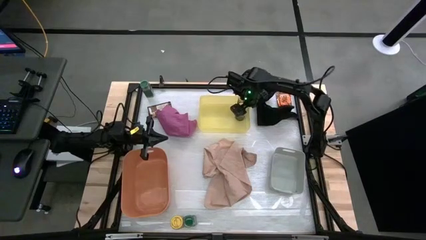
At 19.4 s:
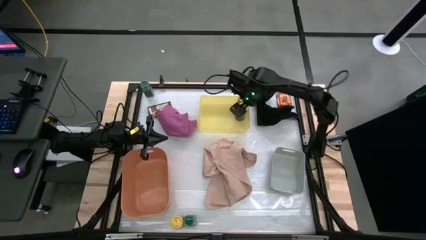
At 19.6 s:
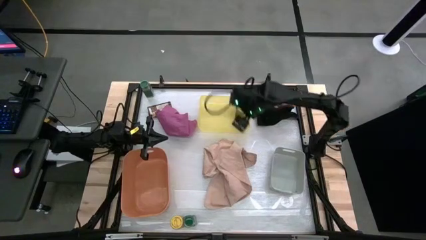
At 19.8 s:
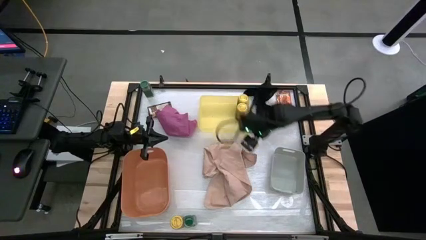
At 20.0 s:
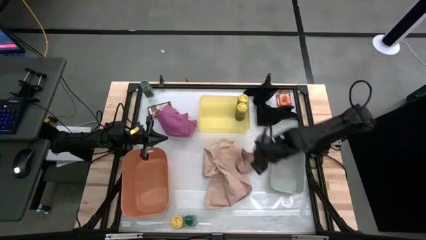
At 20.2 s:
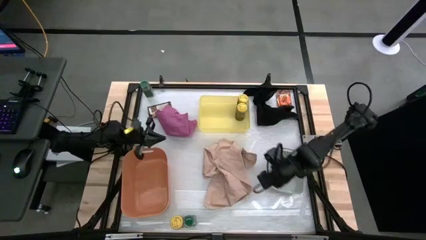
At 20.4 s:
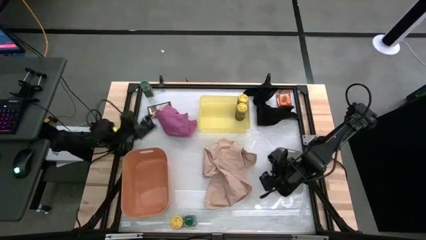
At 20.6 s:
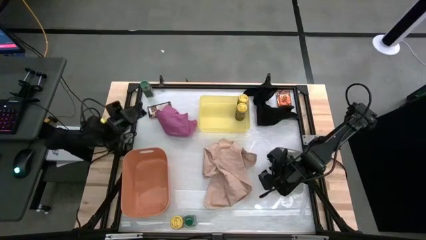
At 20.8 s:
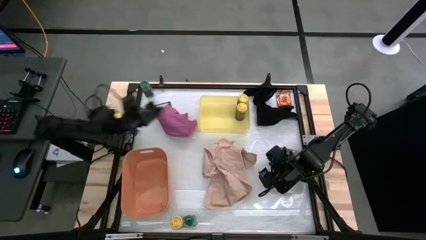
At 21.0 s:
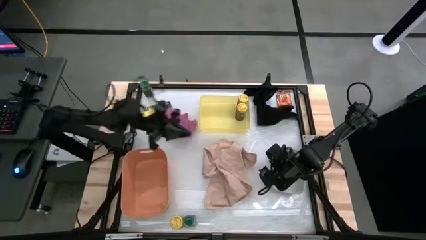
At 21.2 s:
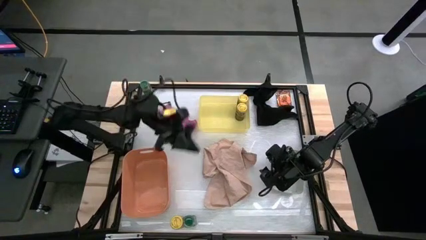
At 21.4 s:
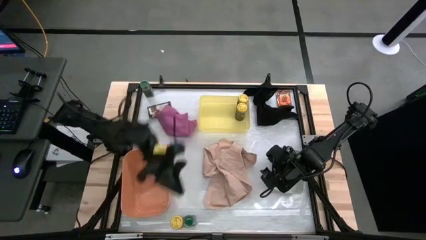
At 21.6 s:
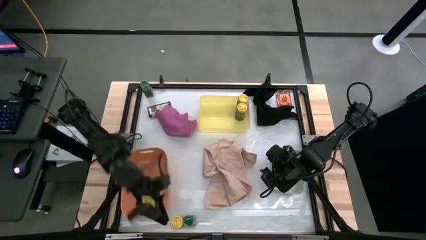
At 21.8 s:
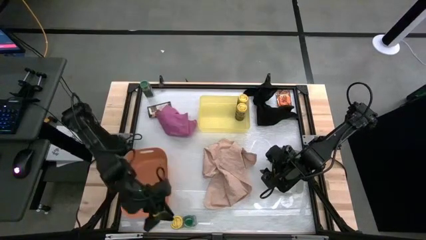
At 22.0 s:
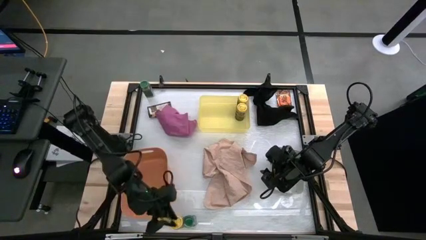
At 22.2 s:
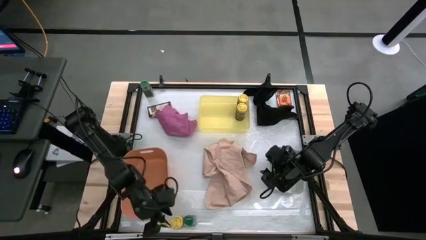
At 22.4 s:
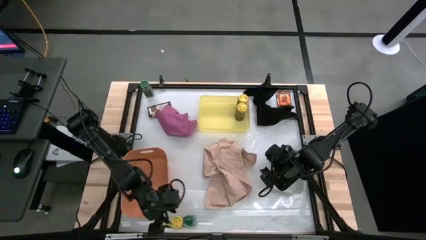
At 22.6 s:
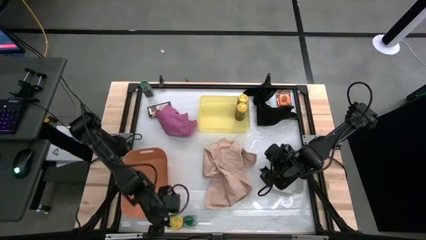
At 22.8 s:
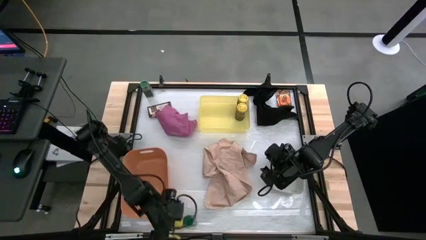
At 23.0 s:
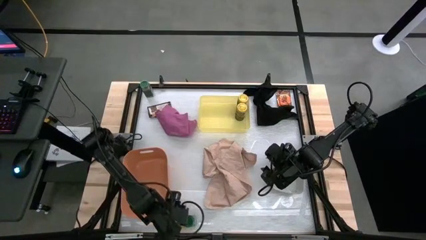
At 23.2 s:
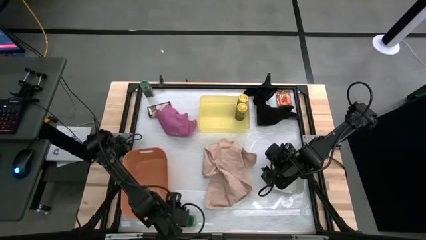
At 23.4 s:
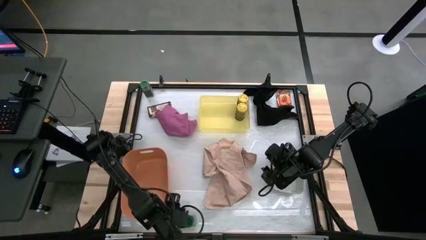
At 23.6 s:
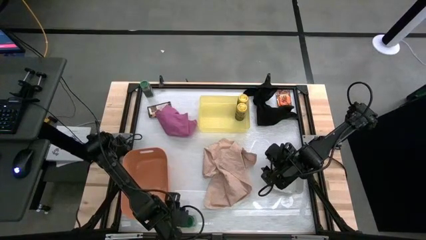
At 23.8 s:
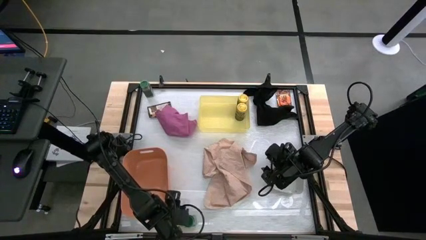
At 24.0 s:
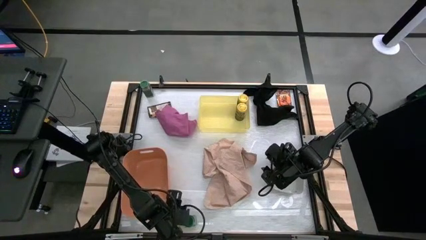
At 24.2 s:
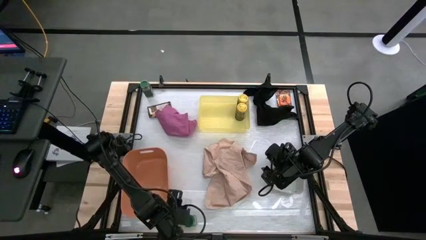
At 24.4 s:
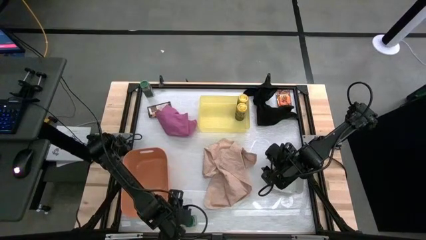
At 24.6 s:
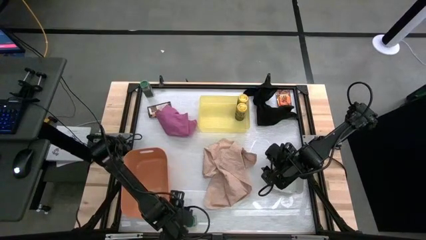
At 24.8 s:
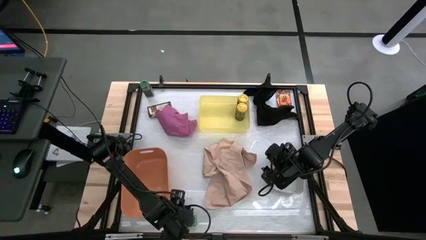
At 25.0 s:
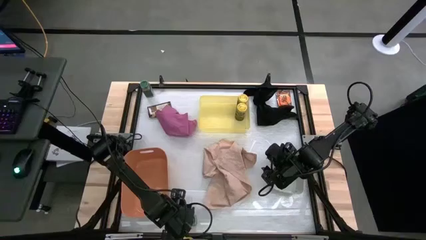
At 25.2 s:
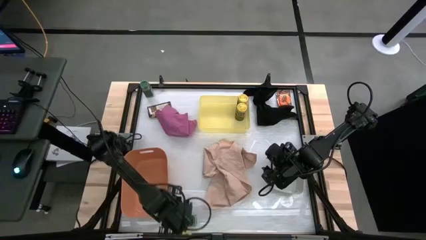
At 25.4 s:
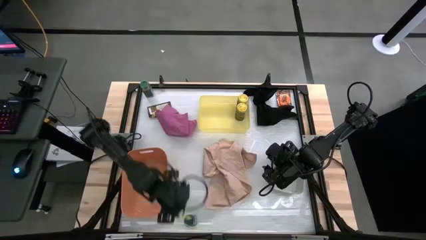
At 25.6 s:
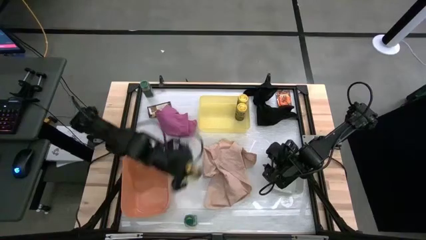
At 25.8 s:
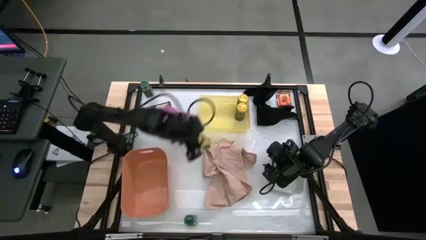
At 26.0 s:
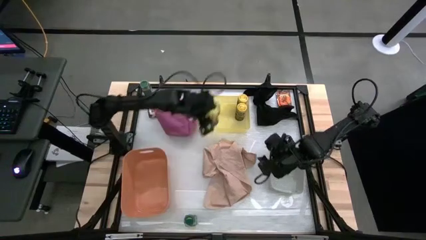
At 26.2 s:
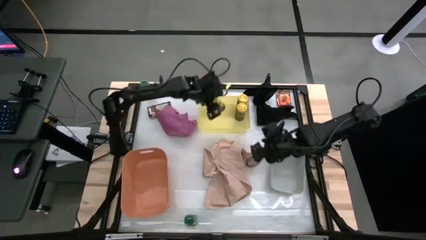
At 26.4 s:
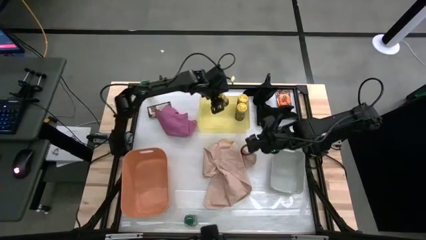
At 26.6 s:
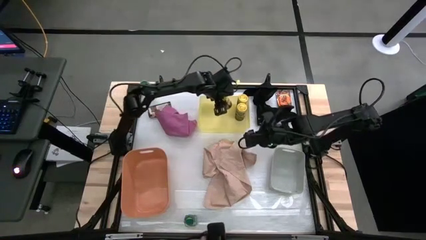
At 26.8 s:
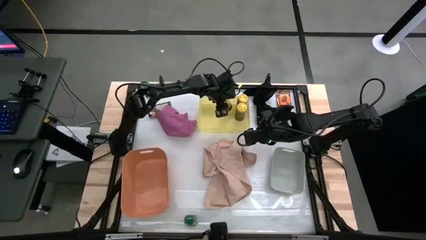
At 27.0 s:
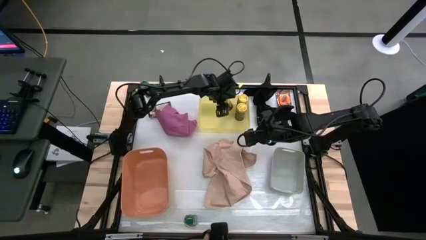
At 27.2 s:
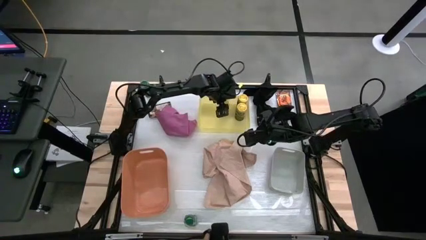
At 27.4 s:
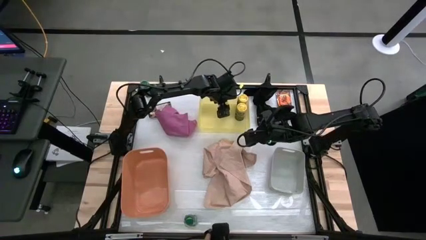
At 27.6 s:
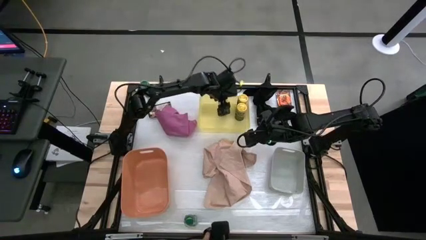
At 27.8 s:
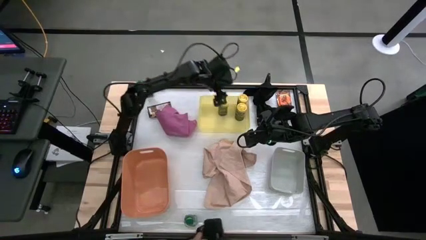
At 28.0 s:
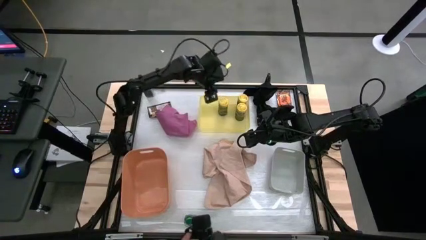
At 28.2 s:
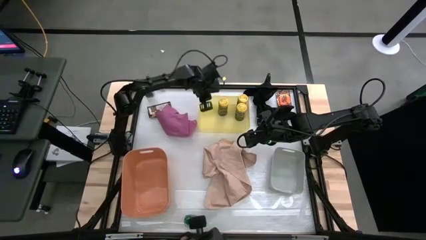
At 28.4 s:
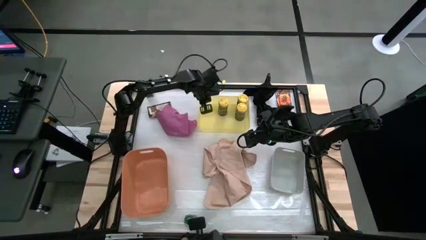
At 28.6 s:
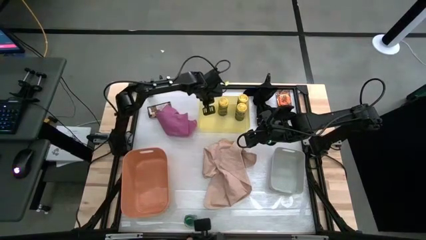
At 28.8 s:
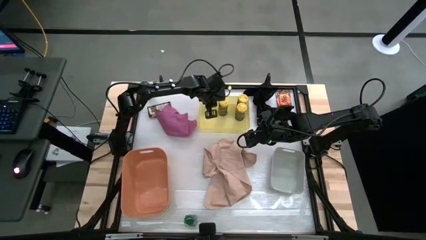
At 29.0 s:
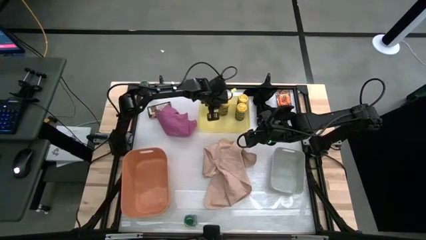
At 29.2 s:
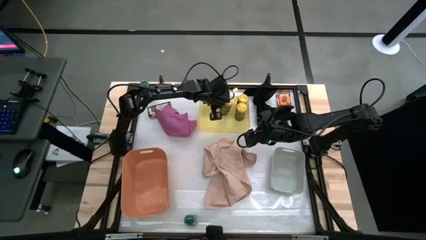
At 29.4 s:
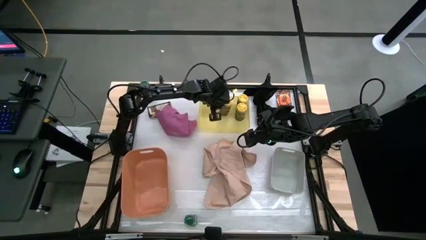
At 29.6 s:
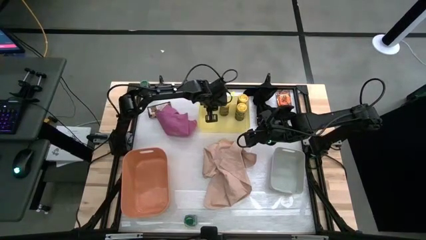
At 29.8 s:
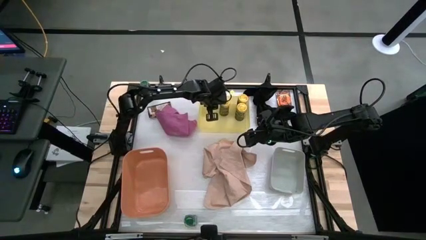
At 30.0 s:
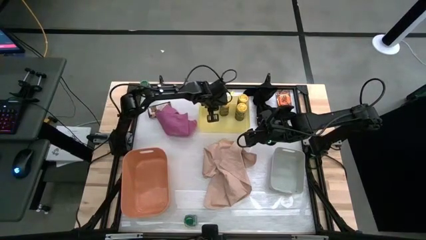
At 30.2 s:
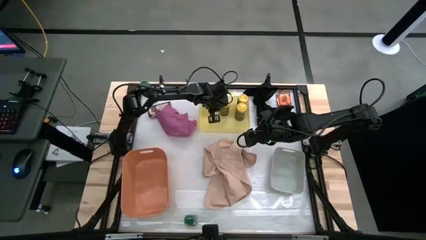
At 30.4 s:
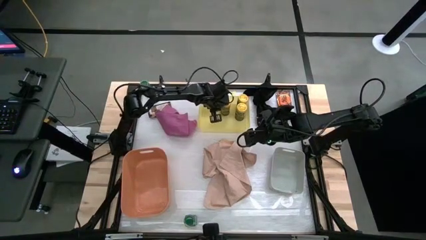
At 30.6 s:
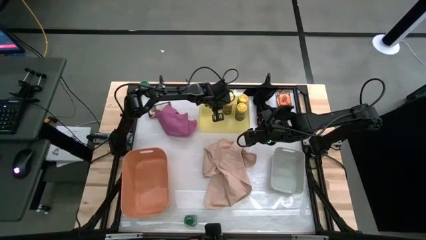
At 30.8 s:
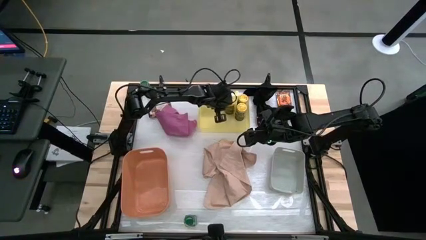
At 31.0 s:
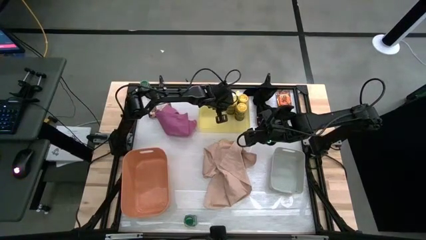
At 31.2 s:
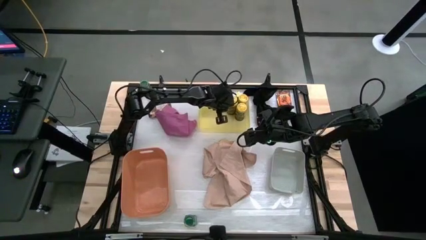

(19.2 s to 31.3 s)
Task: Sort spices by type
Put the yellow seasoning bottle into the yellow bin
